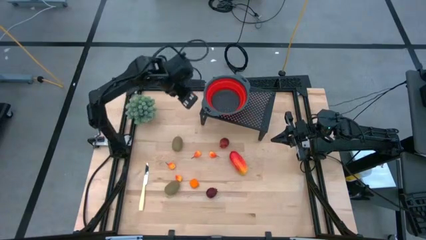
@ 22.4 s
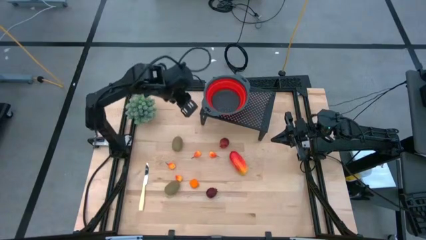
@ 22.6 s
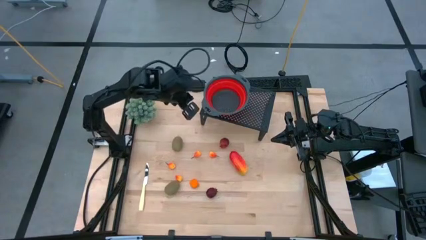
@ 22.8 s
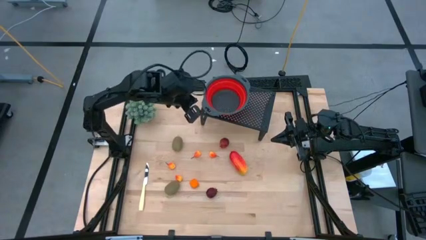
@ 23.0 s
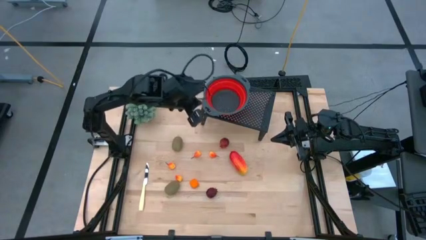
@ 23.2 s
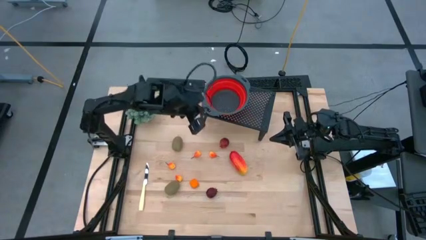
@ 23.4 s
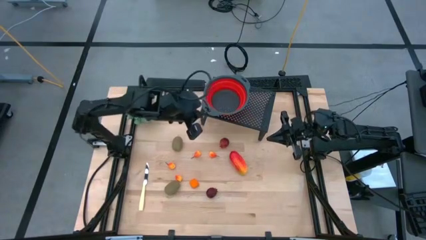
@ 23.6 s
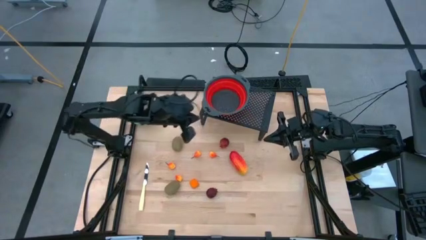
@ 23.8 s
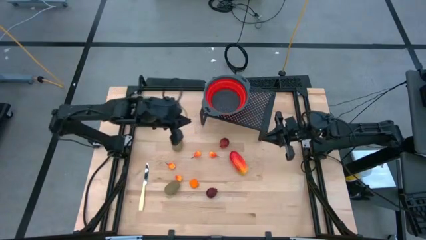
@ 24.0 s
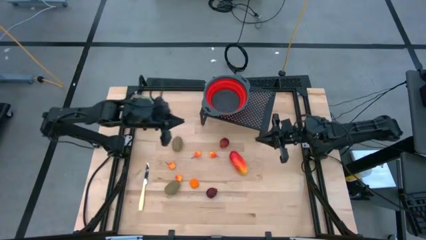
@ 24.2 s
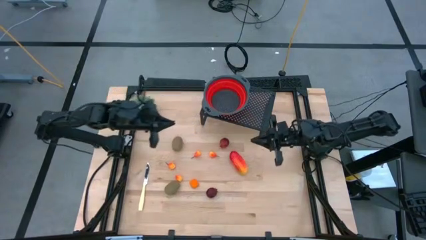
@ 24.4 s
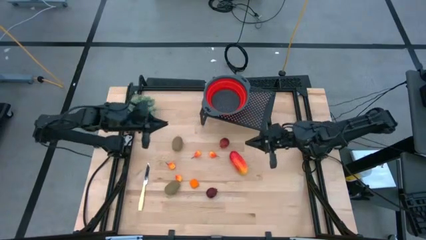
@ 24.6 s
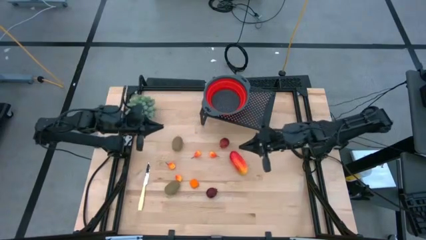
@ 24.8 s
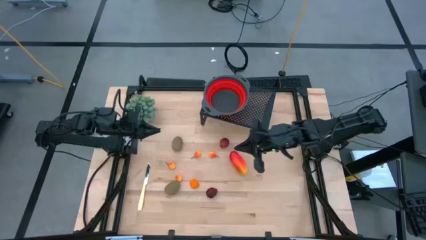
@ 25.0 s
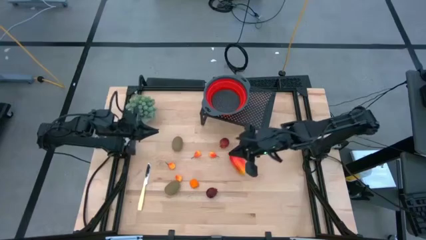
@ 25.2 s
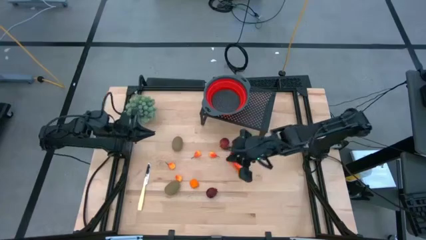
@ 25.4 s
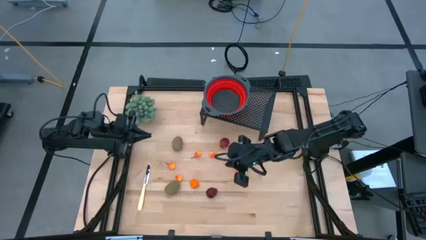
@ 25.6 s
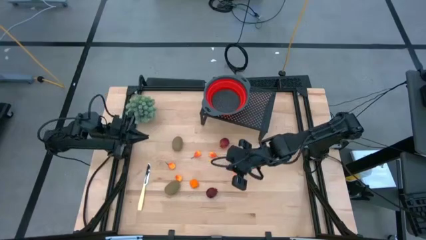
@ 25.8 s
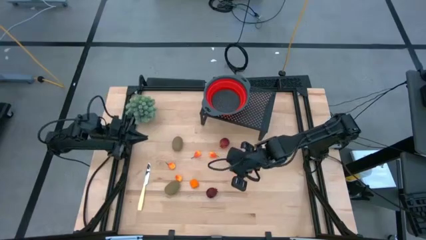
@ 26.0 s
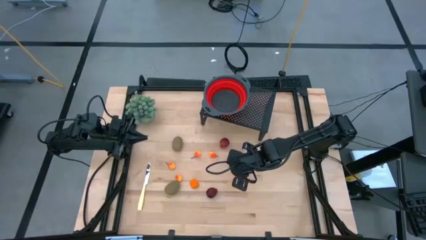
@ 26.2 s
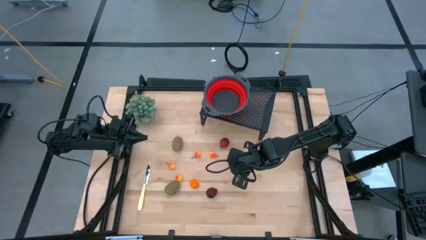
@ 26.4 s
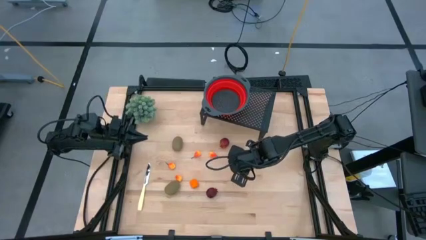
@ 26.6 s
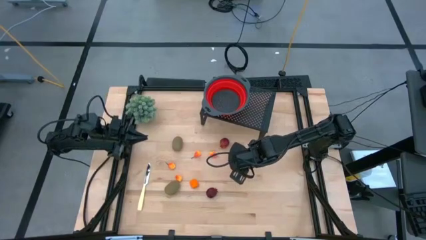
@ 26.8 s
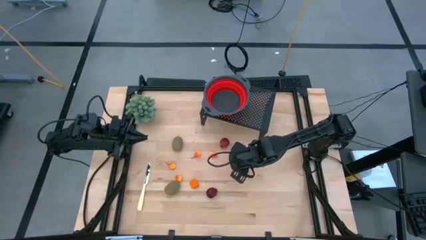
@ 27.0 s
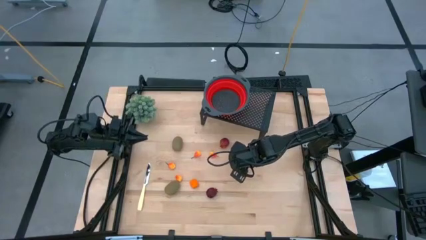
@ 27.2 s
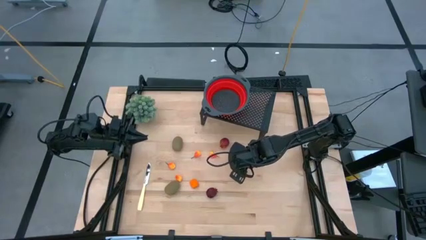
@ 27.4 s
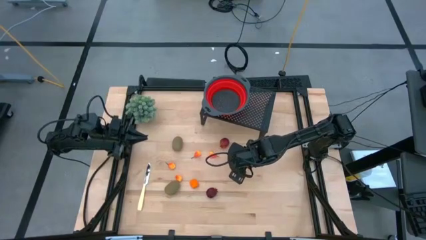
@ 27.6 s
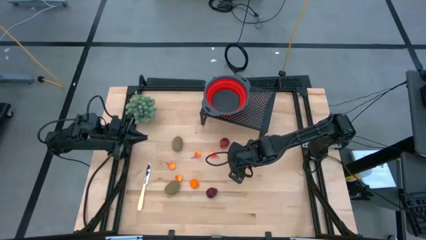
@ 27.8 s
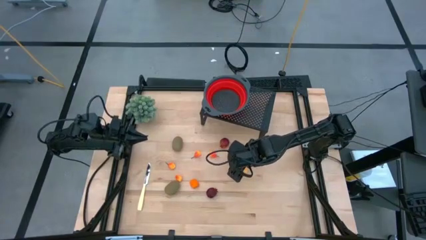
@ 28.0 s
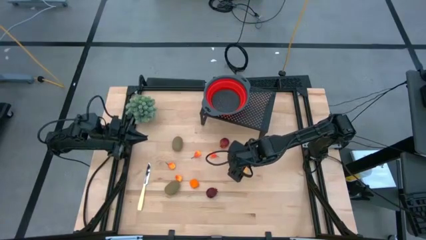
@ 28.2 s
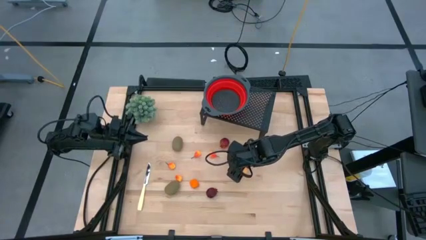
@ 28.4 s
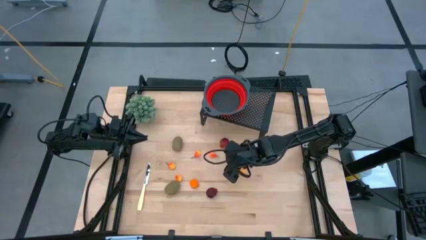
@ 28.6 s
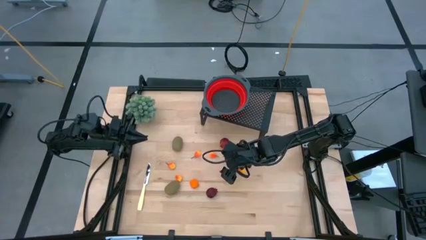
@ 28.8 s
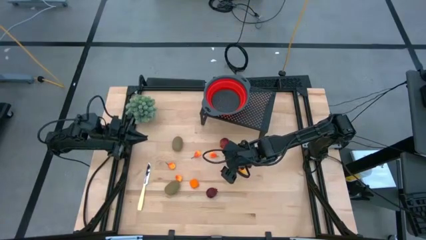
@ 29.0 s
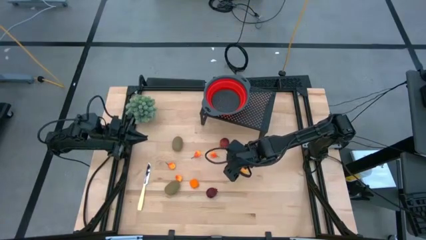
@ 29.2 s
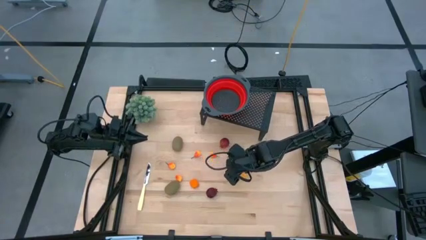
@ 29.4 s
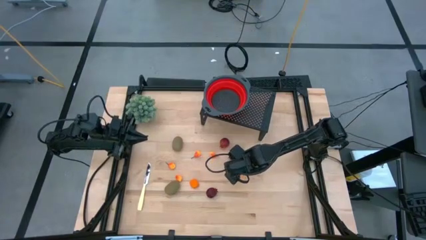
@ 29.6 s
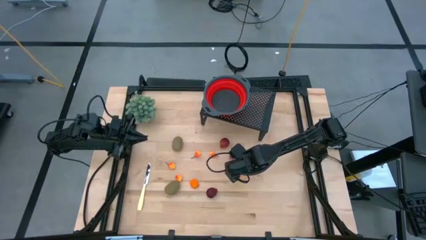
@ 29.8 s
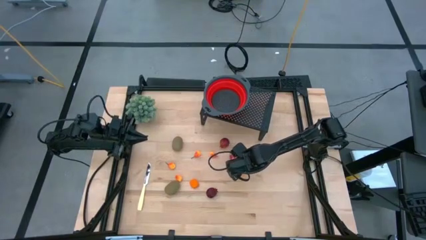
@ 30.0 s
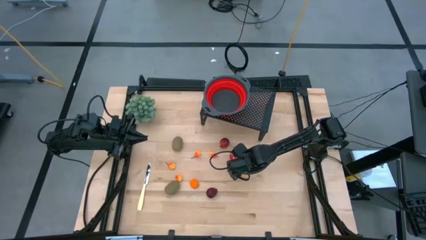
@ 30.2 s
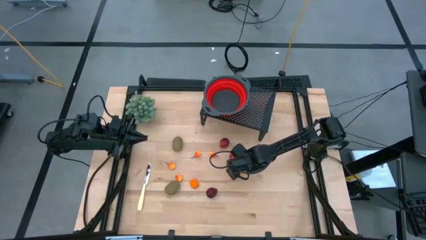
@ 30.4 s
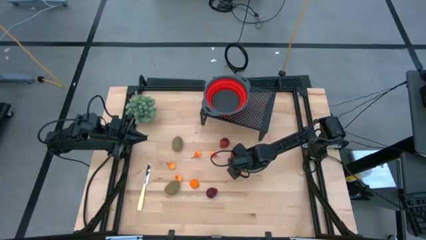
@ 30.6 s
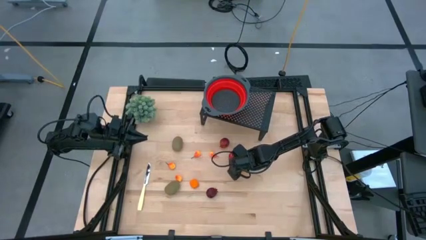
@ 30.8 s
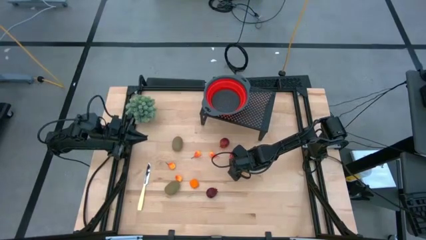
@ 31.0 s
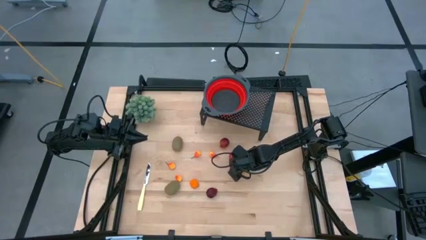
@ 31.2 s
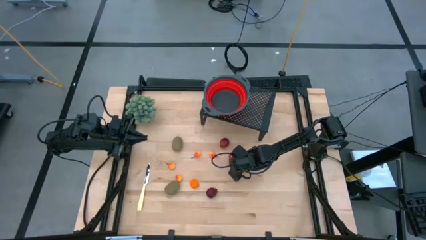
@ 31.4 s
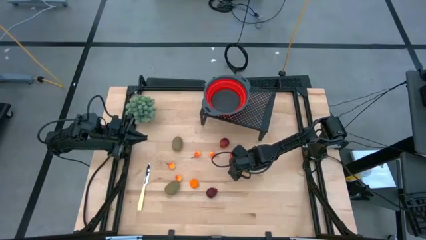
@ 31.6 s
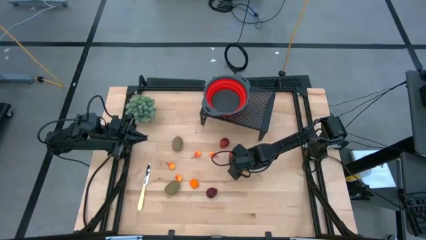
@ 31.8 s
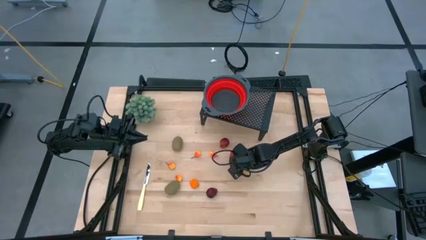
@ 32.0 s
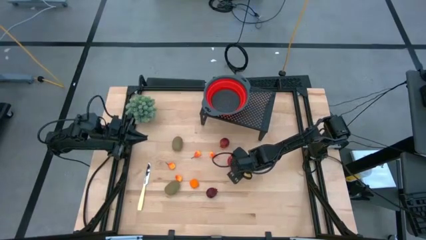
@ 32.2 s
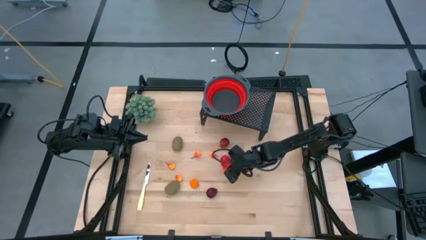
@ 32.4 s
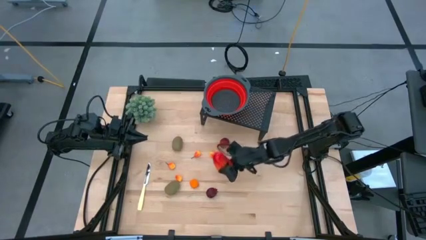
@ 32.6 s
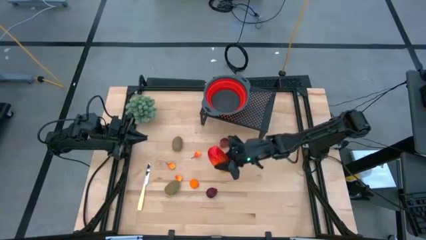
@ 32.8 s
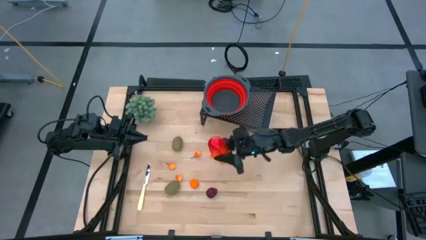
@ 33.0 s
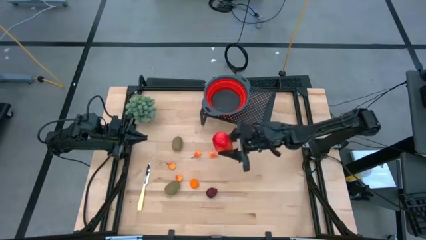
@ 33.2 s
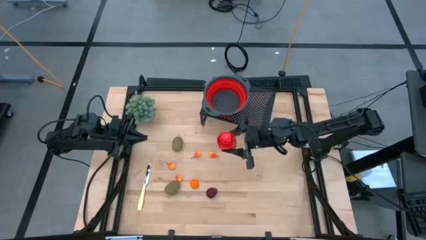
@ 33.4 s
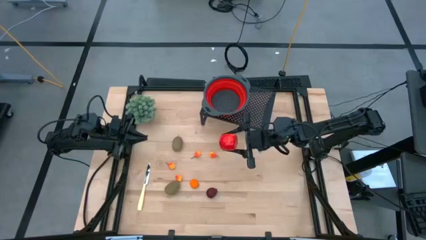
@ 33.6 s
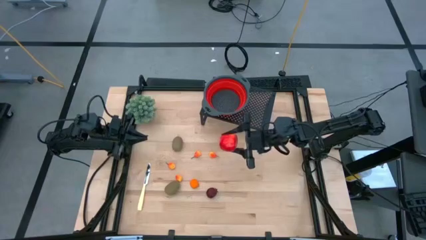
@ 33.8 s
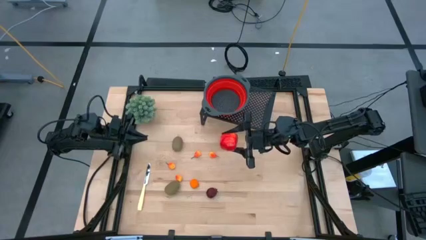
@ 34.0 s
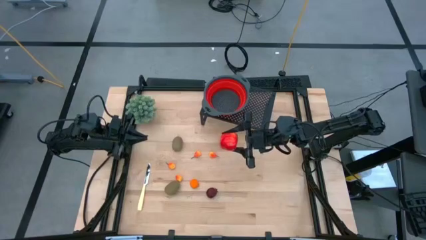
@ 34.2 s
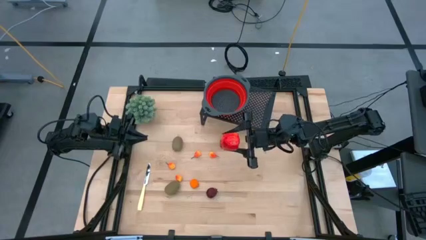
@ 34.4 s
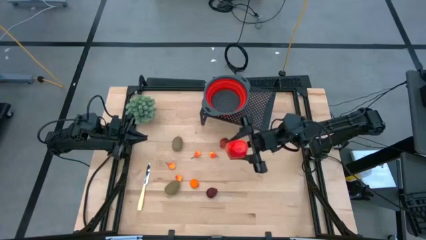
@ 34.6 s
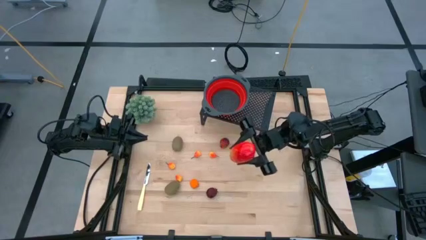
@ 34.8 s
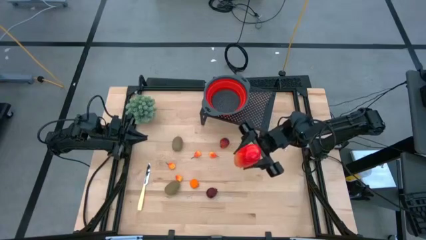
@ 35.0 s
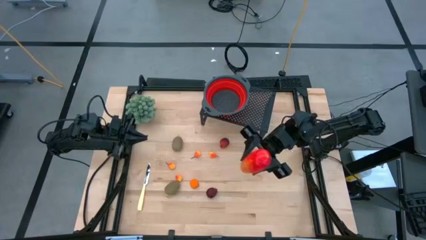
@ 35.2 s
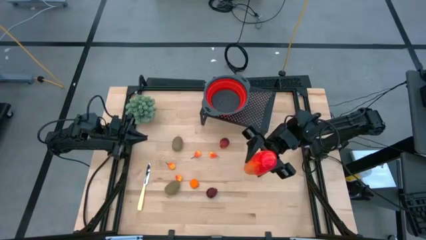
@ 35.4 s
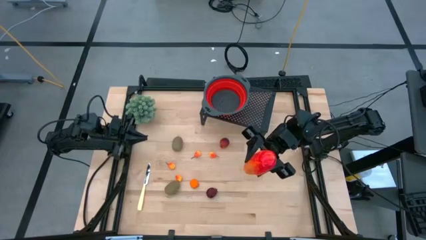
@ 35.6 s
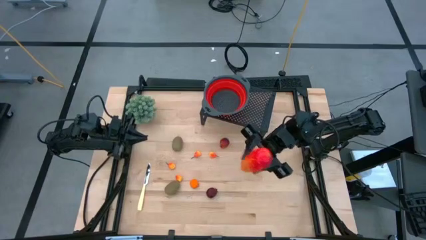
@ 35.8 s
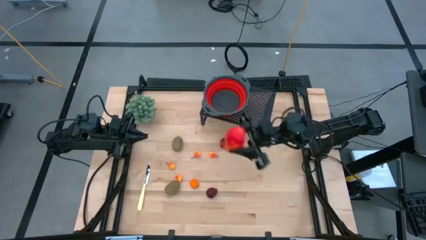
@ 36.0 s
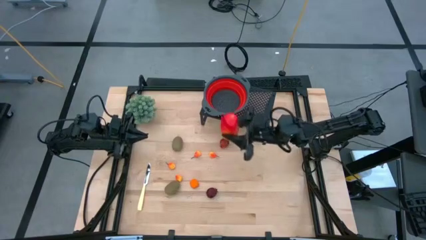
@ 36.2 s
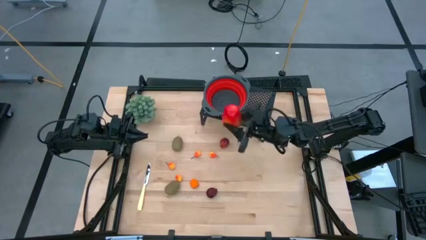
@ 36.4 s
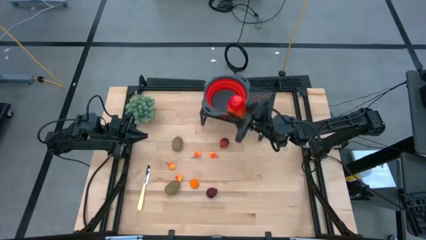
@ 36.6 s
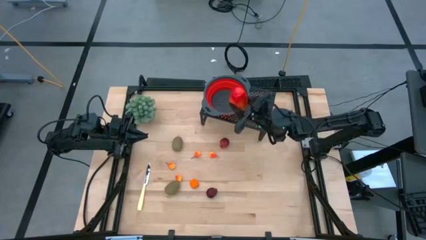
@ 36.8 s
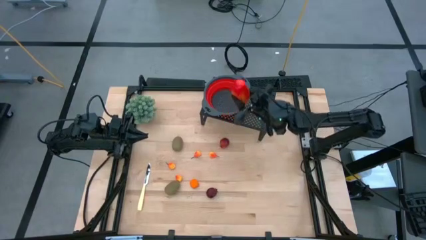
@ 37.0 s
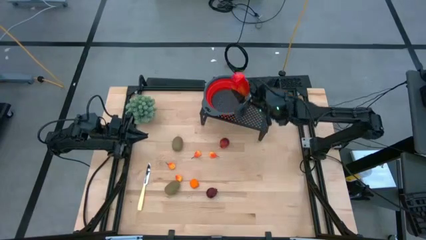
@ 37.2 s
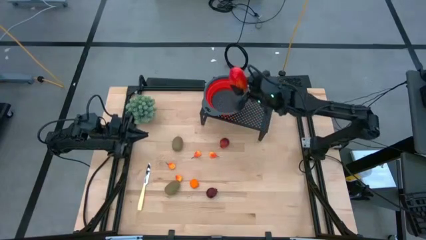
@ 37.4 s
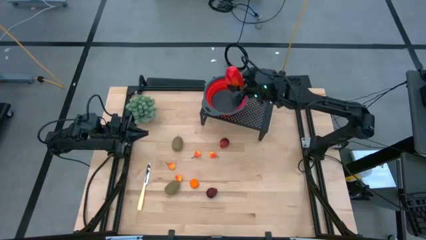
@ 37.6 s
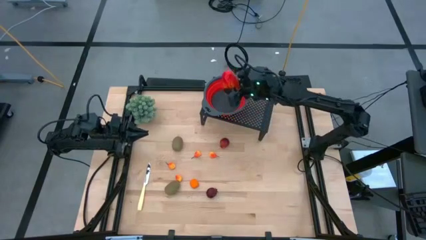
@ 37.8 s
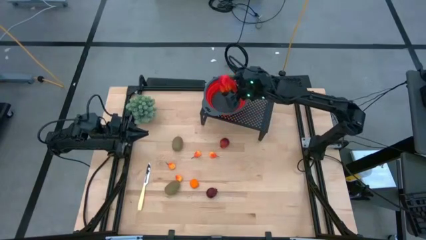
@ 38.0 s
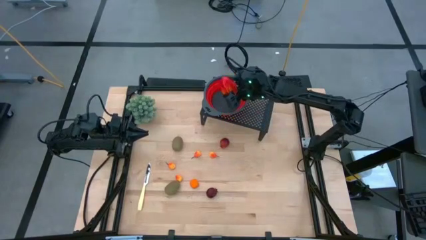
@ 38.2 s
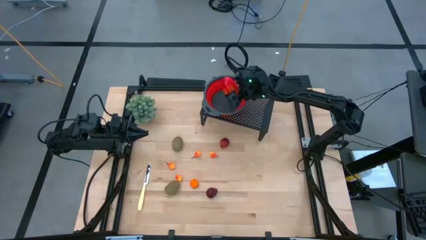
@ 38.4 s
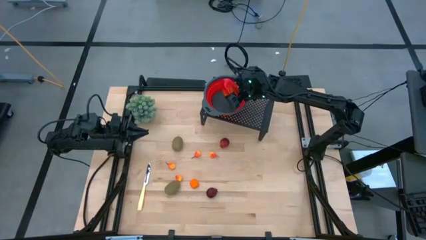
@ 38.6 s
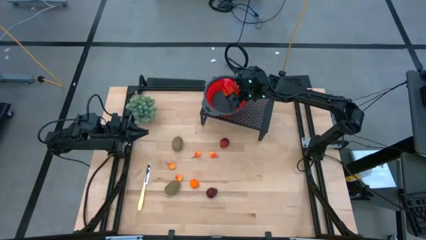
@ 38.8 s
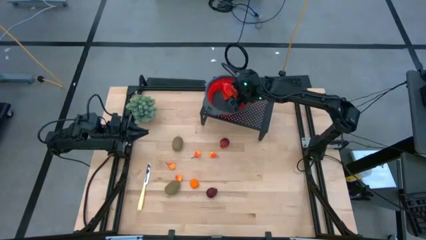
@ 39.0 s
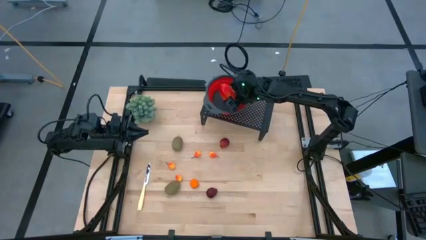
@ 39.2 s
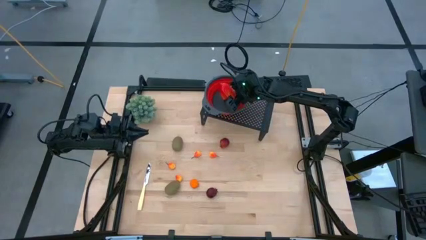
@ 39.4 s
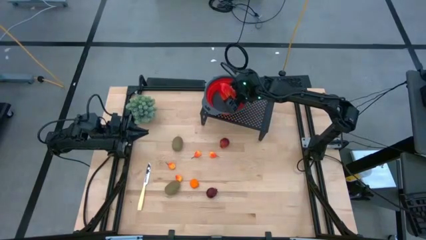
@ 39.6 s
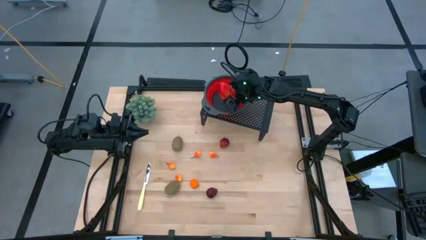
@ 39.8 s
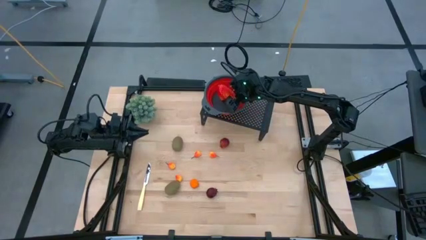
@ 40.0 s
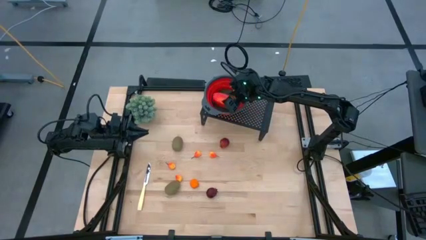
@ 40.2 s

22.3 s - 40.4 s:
Task: Pick & Place Fruit
Put the mango into the red strainer bowl on the shelf
